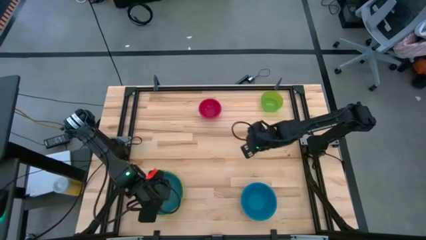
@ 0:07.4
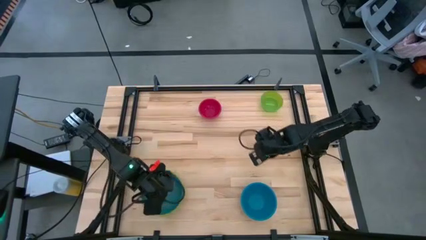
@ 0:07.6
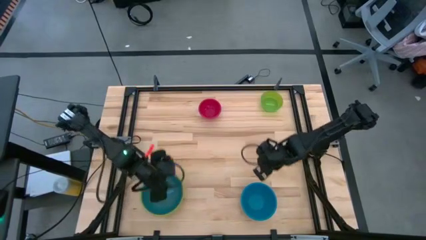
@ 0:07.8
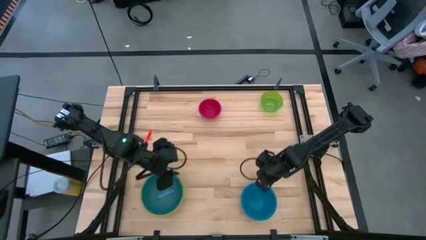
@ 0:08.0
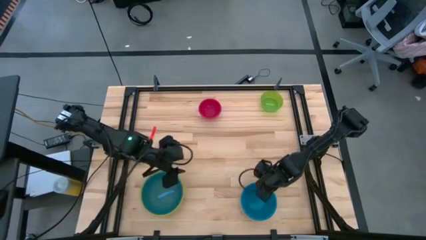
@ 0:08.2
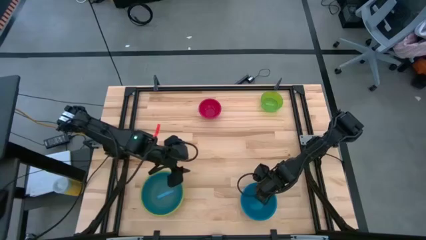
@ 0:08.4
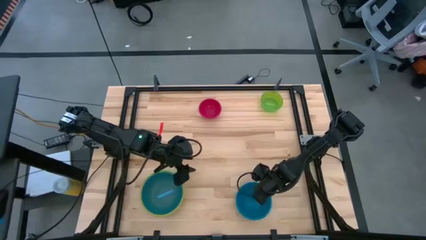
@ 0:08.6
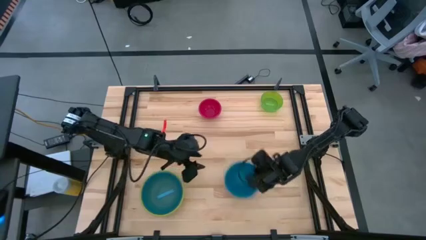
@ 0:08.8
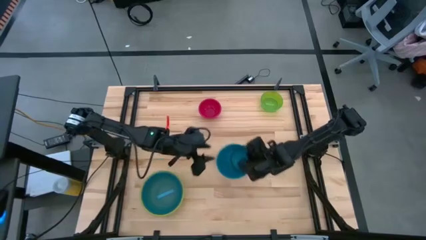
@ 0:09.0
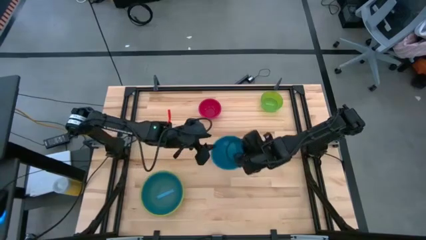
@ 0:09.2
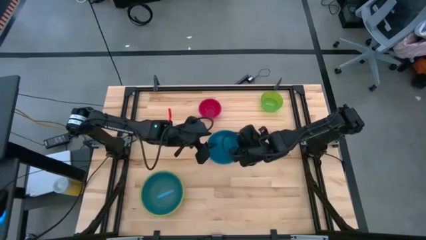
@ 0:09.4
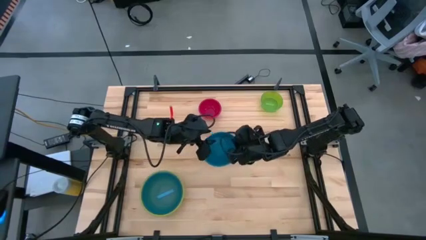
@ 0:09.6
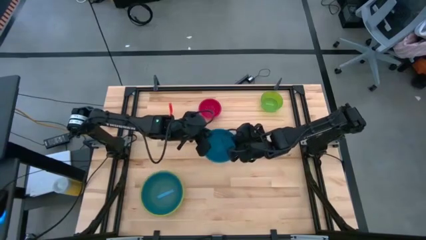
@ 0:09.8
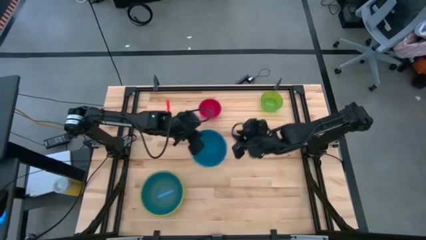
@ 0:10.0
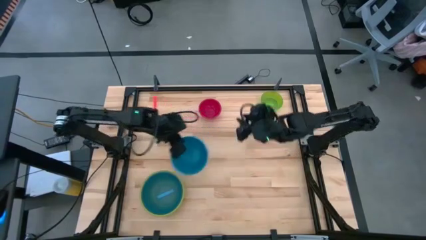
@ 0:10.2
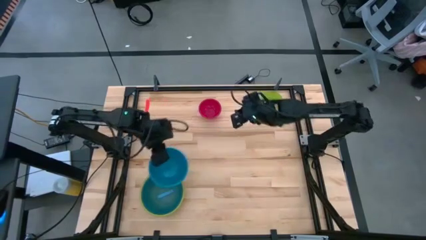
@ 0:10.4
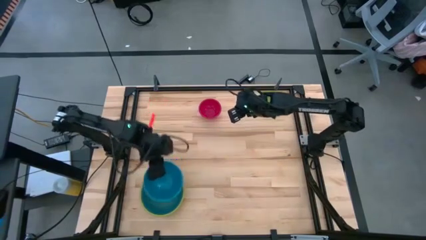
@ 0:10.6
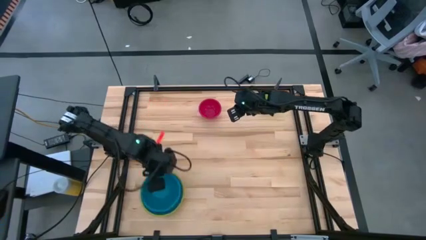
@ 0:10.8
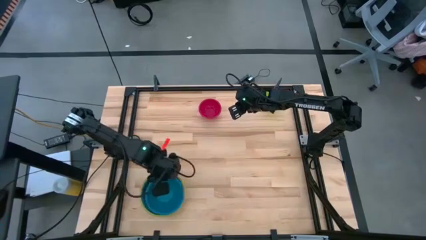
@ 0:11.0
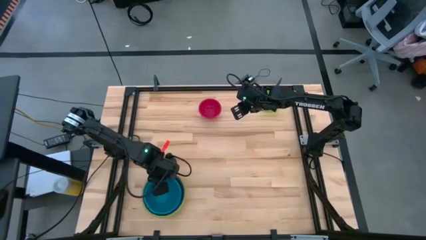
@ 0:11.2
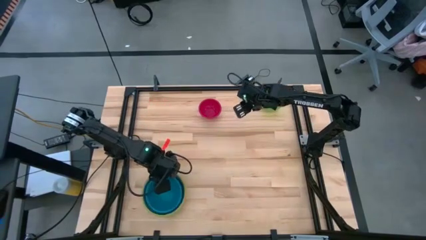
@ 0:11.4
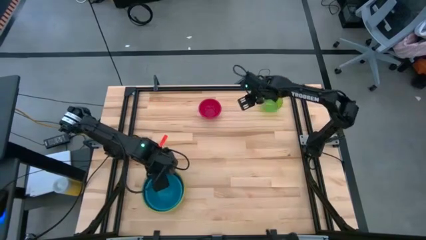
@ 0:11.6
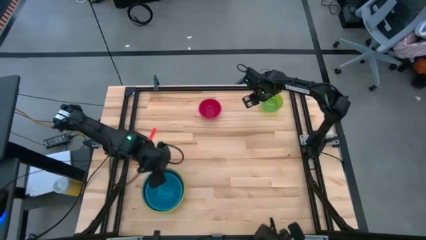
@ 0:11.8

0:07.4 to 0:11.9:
Stack the blue bowl on top of the light blue bowl

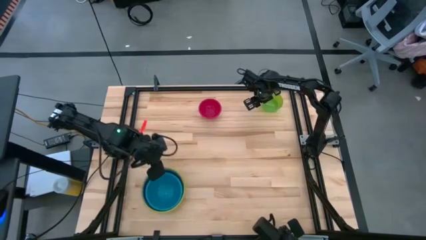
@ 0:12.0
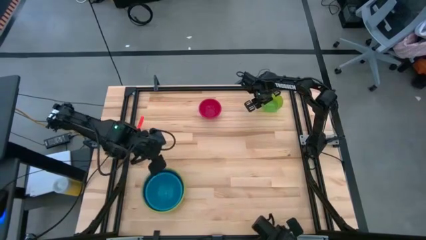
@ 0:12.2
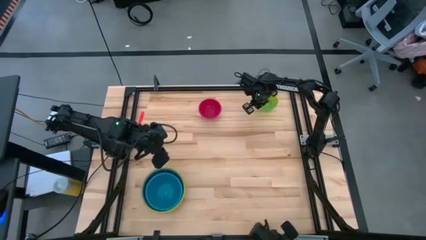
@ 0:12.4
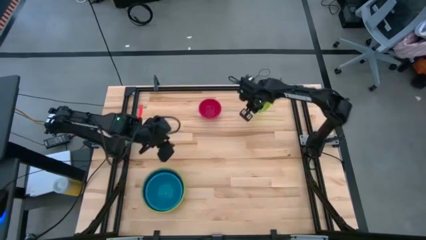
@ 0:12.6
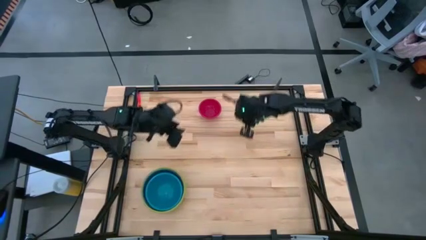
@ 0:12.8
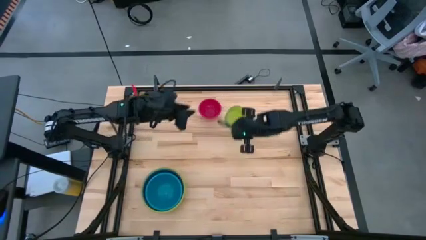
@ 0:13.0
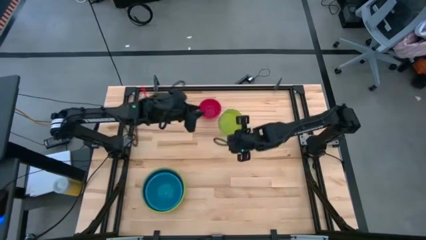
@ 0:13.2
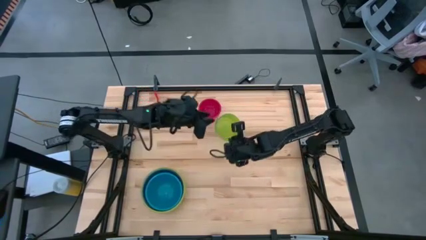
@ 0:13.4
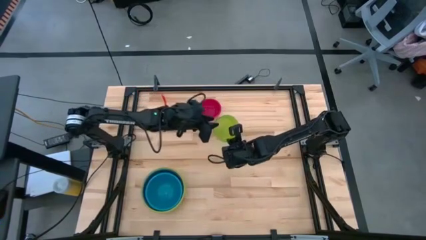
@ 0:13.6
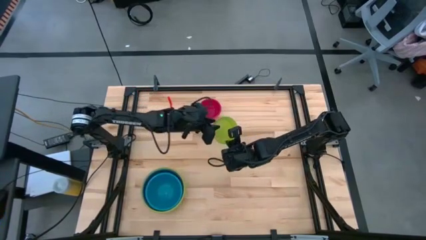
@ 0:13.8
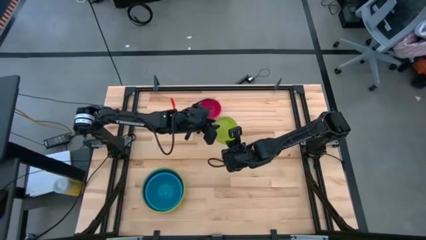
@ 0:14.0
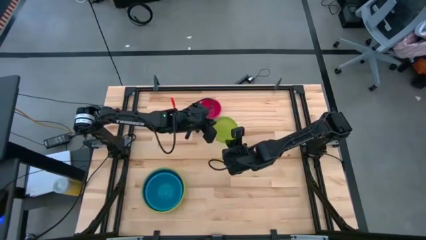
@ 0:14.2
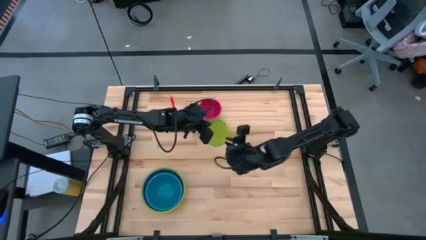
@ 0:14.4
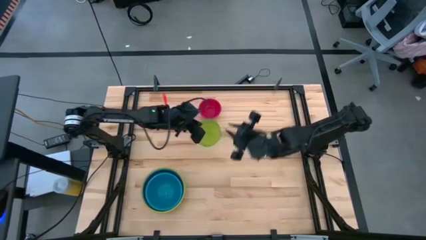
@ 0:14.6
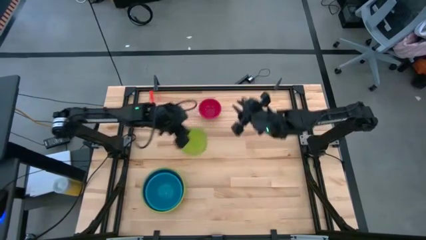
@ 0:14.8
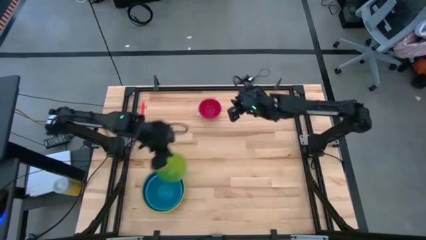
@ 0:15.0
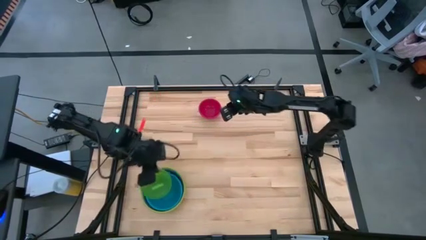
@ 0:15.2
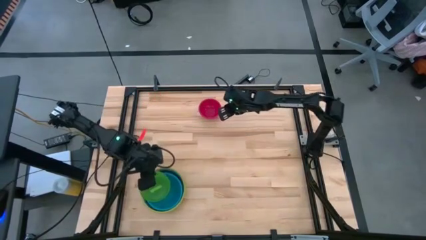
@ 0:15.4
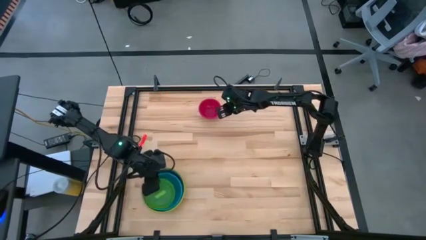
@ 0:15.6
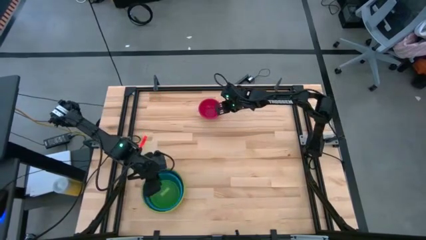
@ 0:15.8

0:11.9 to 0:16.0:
Stack the light green bowl on top of the blue bowl

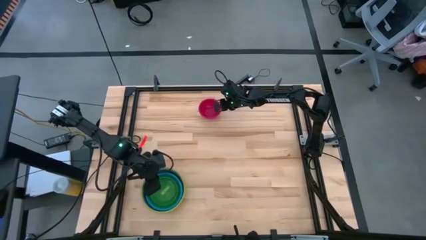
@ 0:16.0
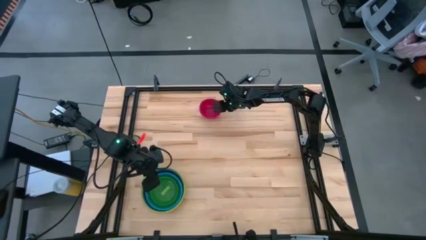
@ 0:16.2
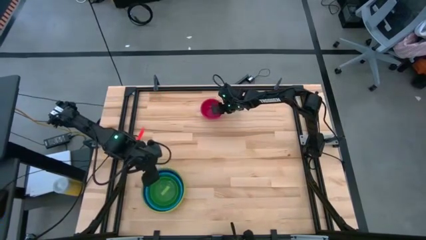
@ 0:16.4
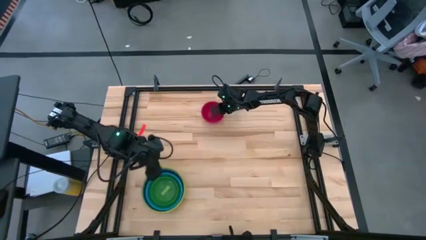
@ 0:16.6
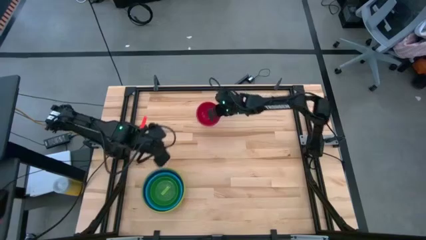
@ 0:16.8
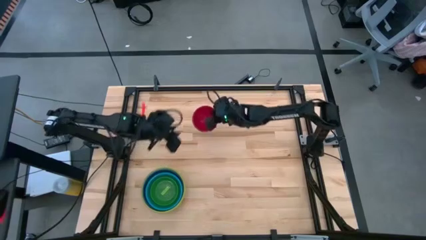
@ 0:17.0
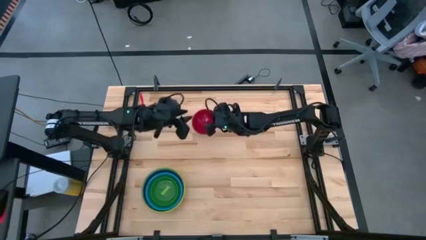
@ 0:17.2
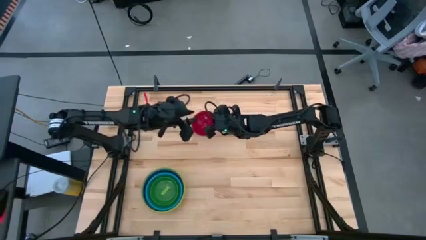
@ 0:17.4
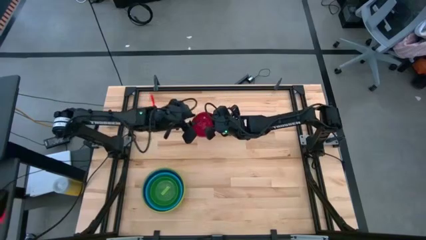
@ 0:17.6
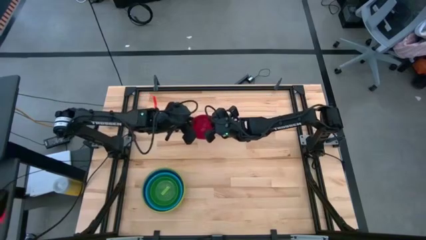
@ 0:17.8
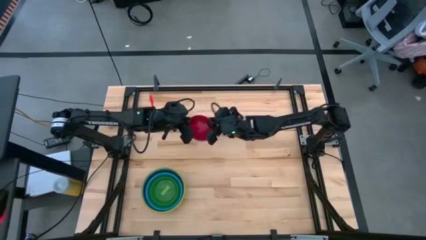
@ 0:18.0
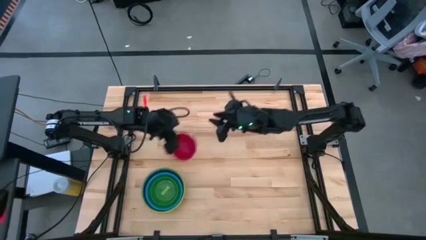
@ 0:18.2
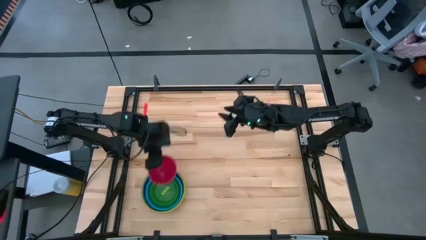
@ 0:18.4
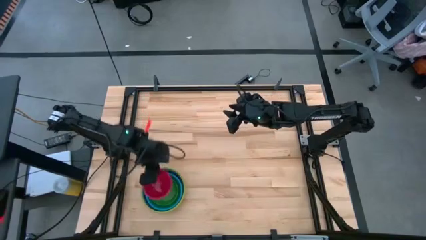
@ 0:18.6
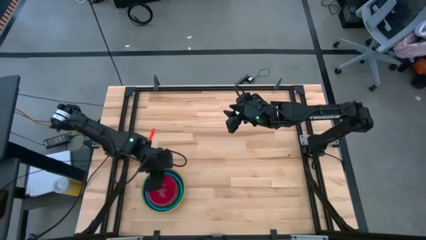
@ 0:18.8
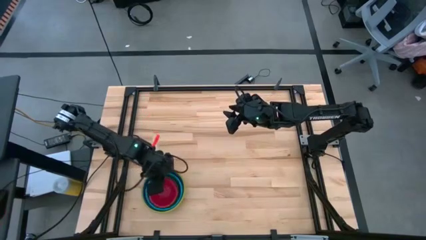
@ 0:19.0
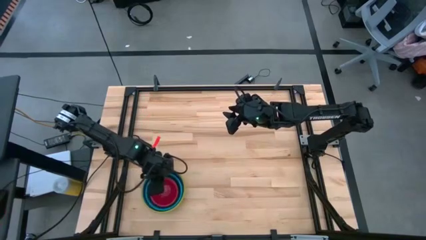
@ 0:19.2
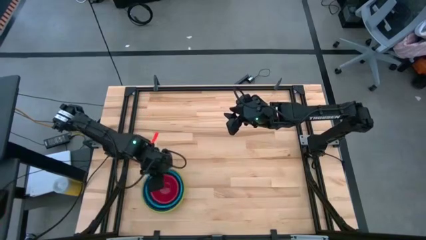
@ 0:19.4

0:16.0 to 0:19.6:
Stack the red bowl on top of the light green bowl

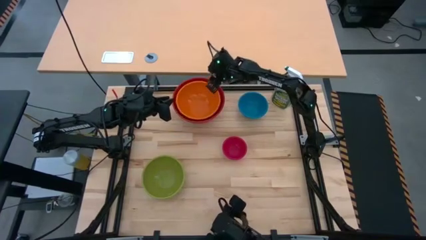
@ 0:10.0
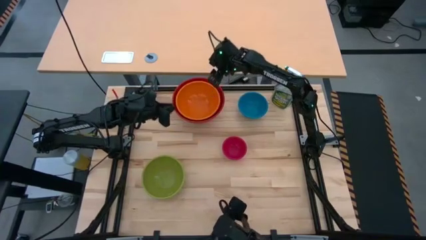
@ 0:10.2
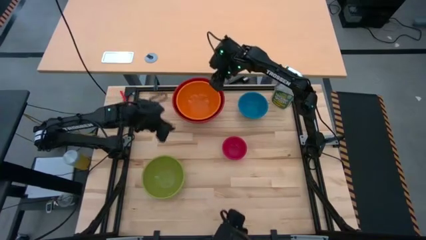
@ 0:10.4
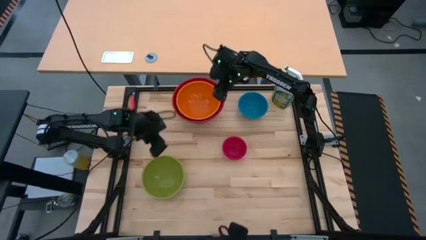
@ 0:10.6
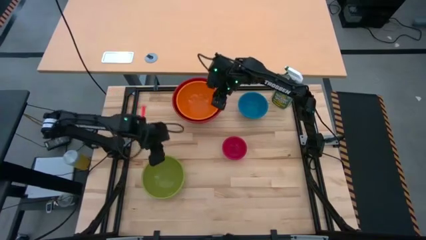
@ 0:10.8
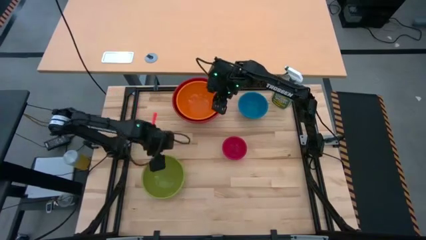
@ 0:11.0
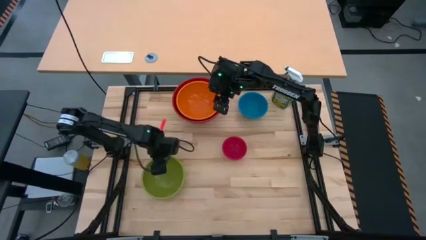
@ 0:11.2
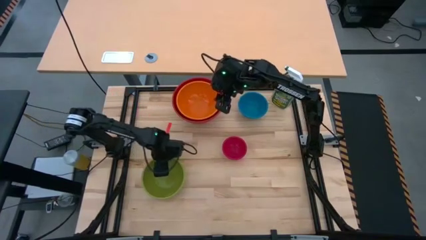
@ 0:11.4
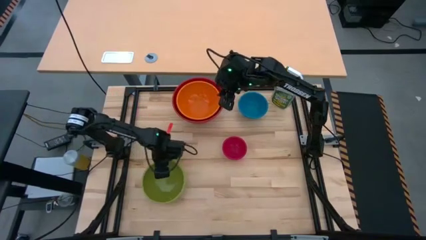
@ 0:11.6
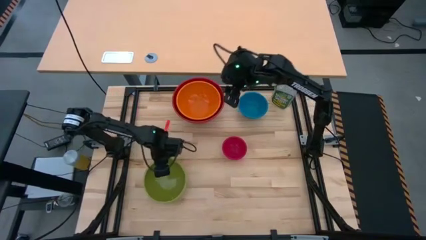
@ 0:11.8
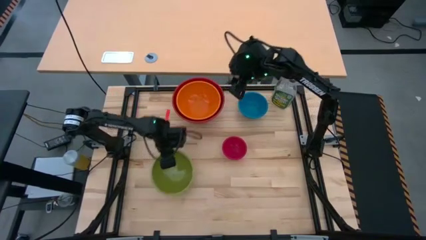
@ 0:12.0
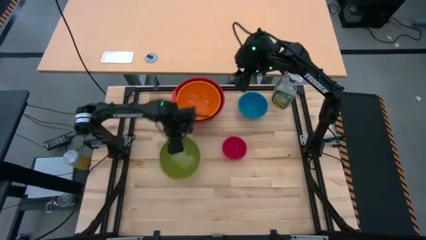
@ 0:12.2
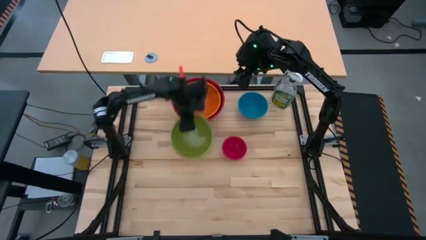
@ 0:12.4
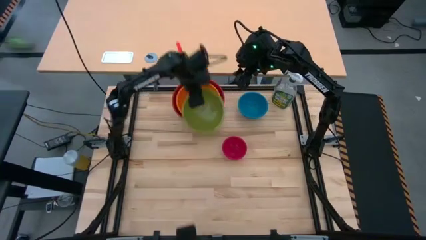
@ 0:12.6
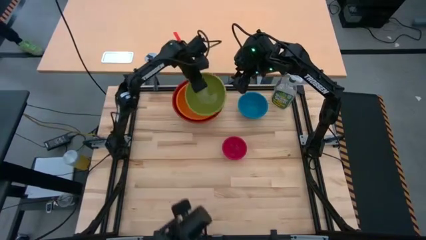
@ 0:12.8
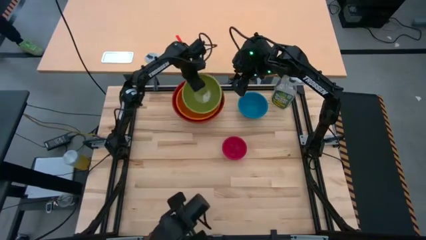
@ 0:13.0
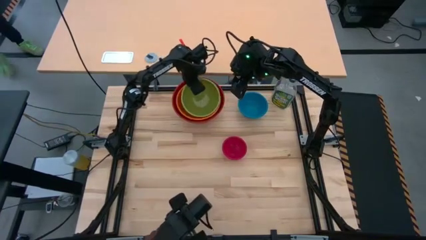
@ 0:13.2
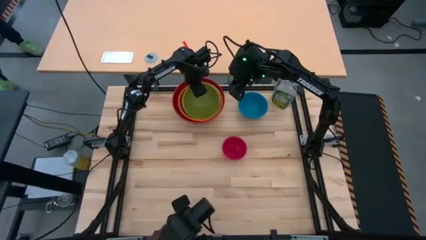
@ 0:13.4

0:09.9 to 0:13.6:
Stack the green bowl on the orange bowl
